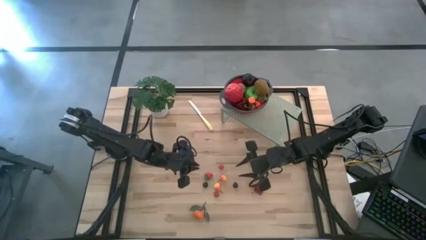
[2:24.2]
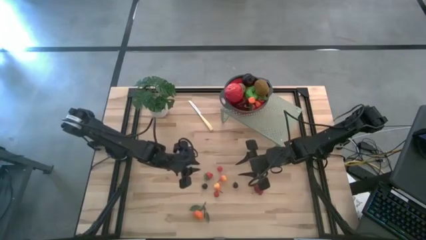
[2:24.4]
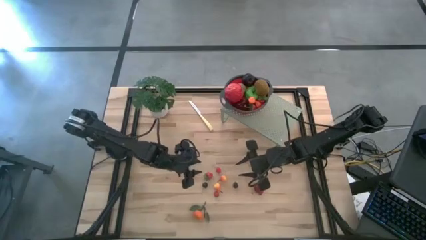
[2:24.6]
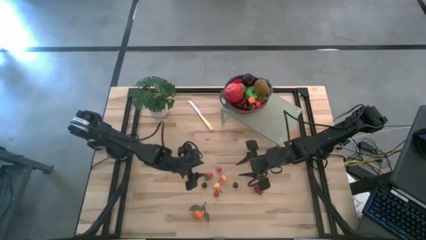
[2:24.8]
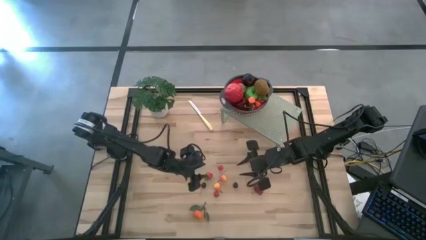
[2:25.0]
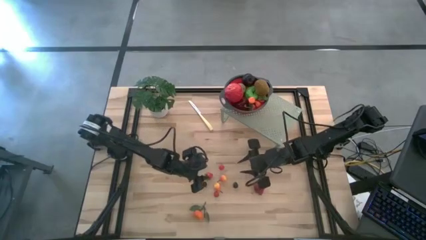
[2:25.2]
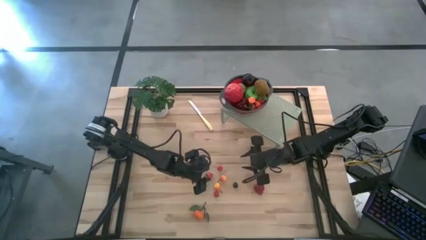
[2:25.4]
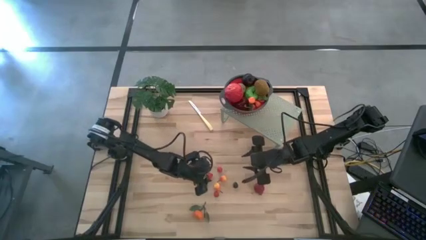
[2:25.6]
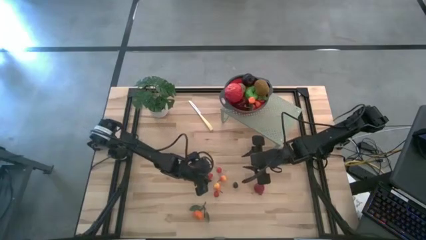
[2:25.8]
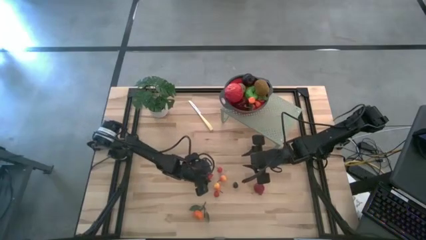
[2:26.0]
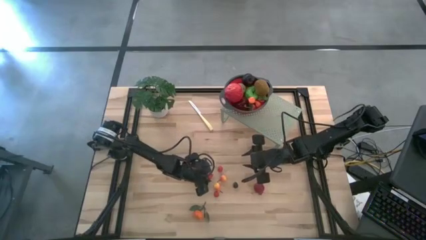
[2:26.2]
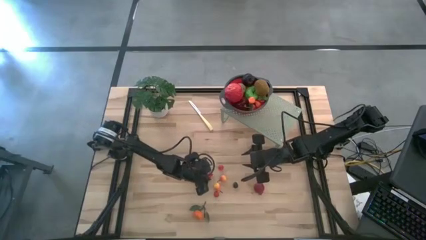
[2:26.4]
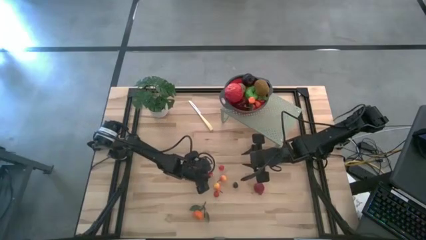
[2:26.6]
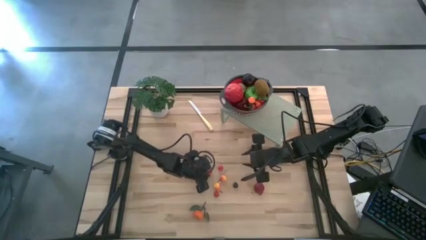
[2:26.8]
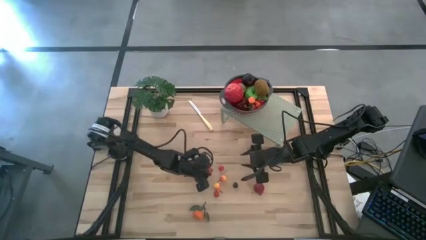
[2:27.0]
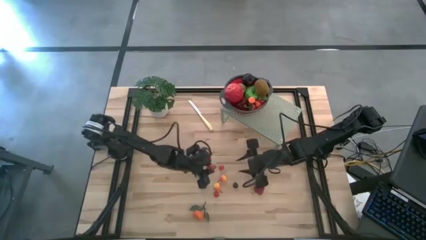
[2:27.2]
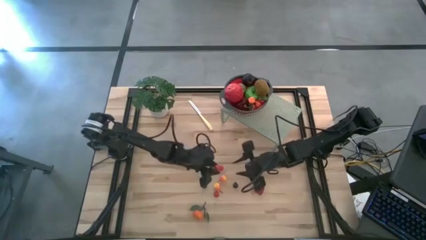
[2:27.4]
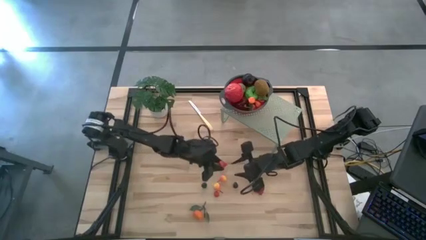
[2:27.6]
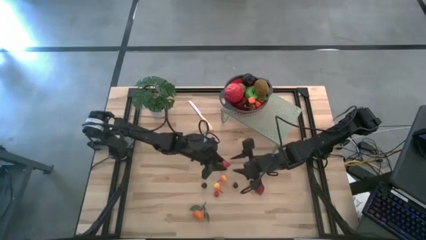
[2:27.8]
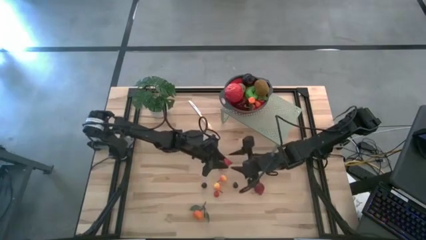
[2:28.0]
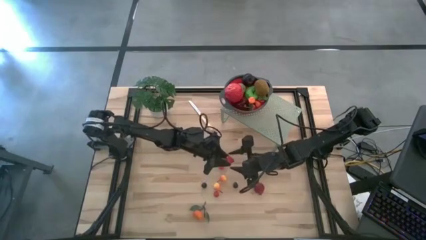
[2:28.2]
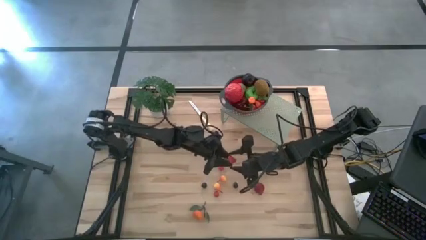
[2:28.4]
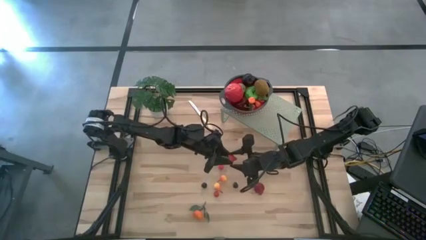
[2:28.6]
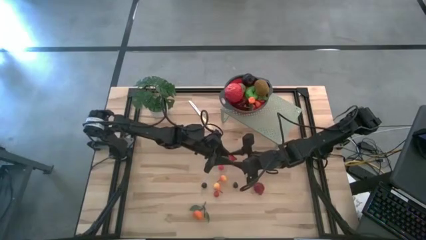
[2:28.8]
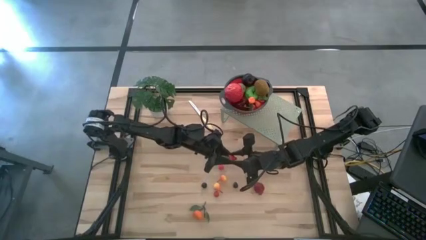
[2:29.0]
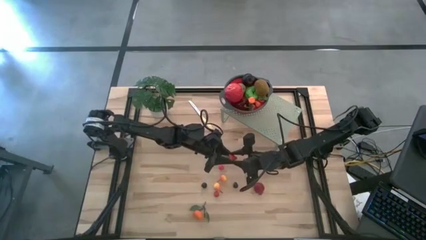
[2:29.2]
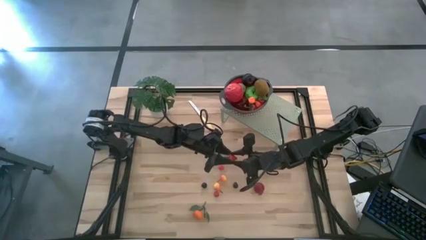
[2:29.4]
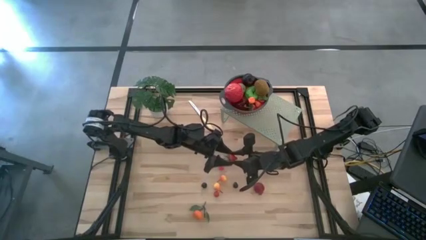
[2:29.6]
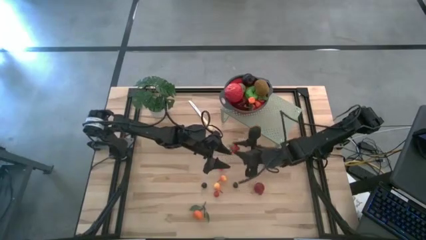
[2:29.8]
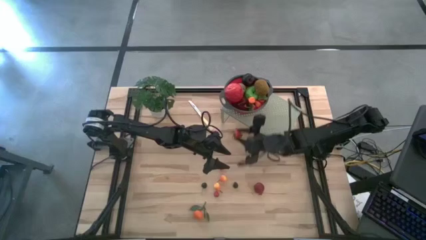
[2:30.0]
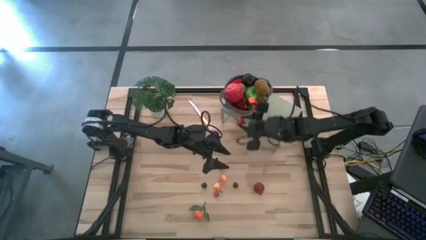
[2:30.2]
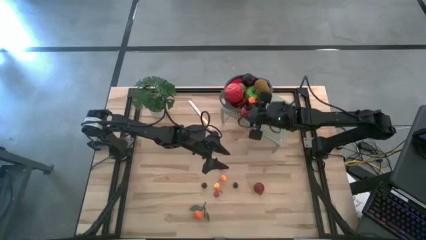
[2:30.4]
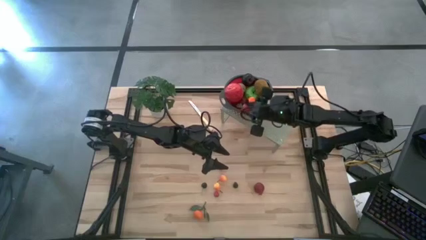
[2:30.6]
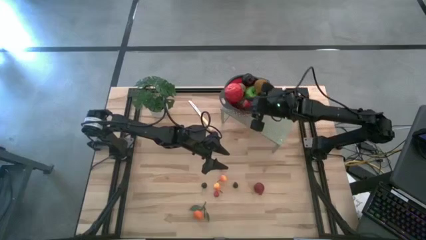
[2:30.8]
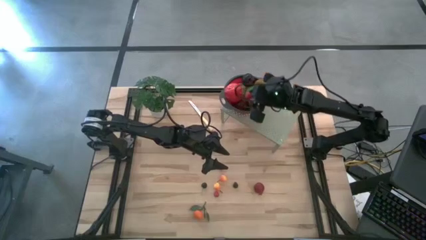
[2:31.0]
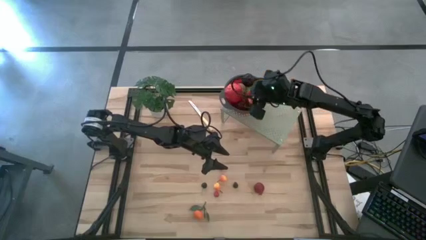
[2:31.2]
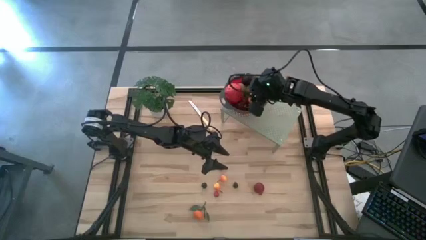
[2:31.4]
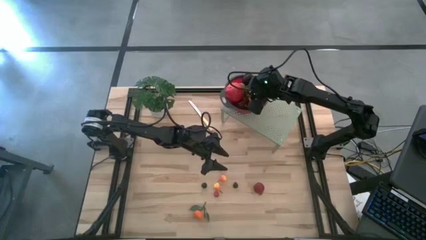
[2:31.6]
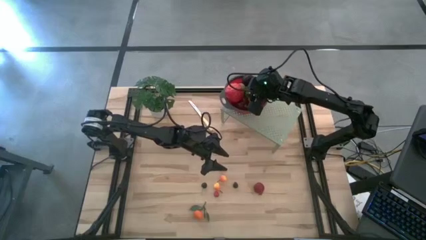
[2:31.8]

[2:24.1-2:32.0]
Task: Pick & Place Fruit
Put the strawberry into the red gray colander on the shelf

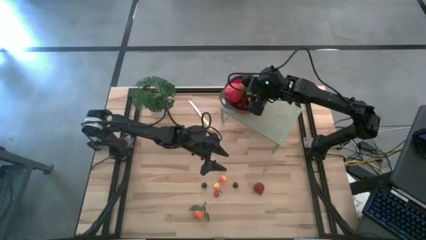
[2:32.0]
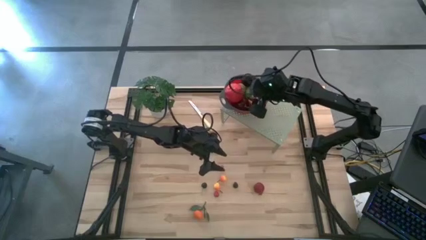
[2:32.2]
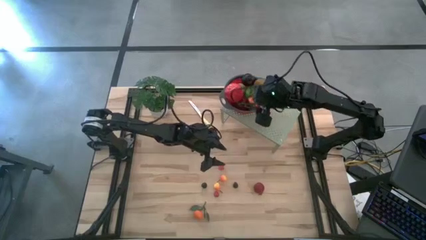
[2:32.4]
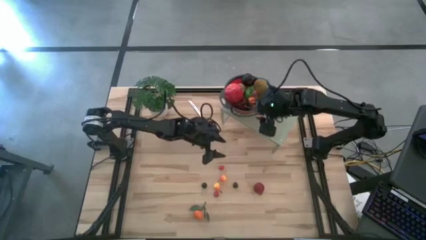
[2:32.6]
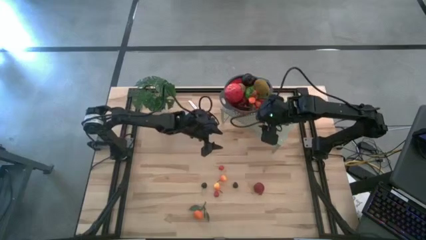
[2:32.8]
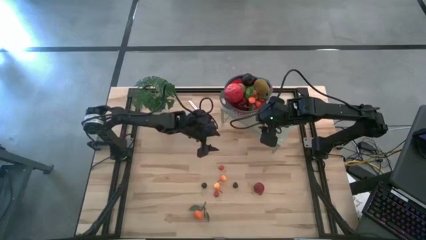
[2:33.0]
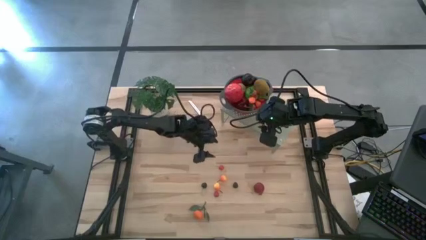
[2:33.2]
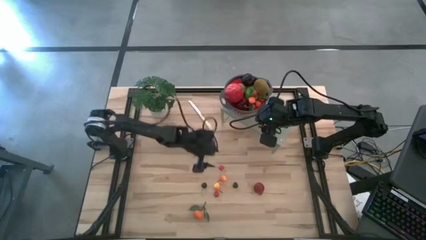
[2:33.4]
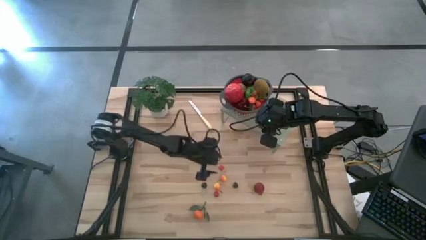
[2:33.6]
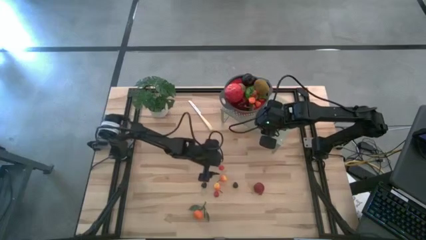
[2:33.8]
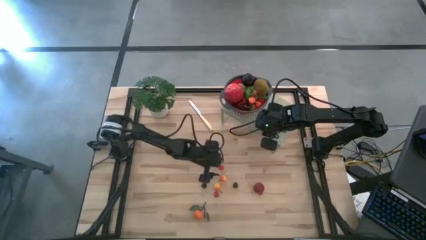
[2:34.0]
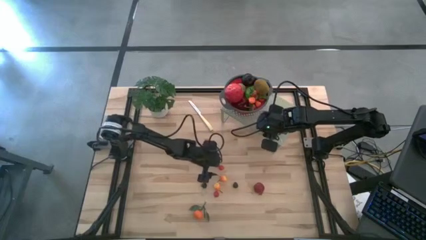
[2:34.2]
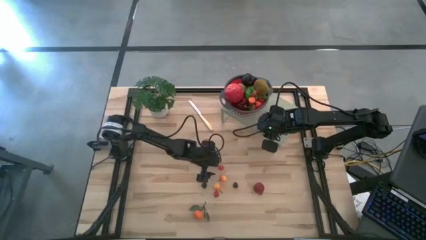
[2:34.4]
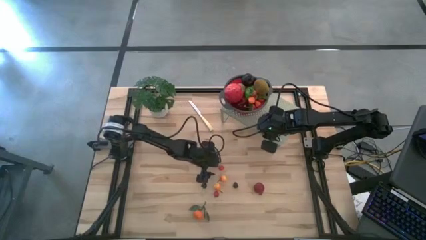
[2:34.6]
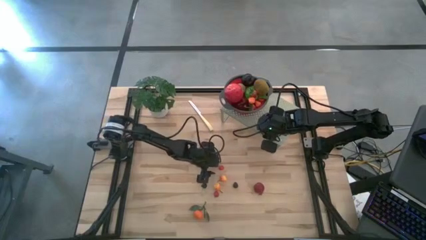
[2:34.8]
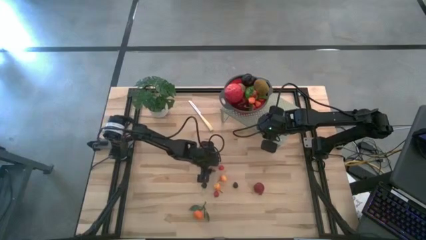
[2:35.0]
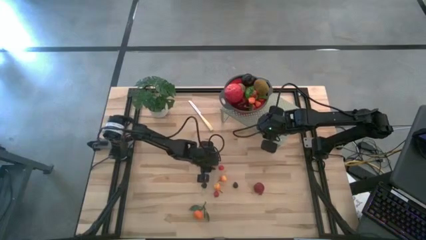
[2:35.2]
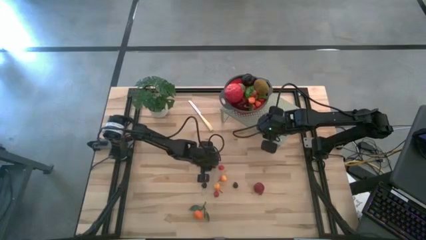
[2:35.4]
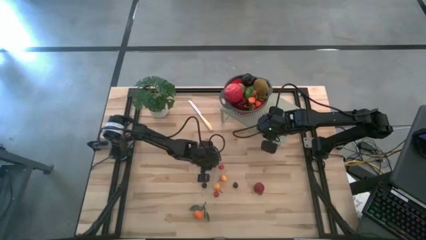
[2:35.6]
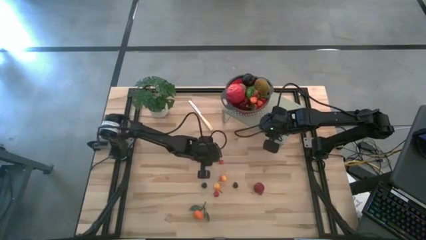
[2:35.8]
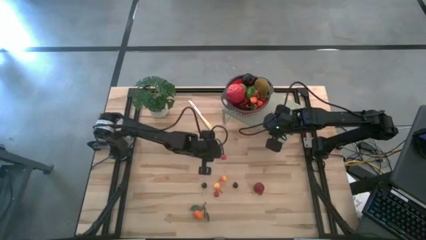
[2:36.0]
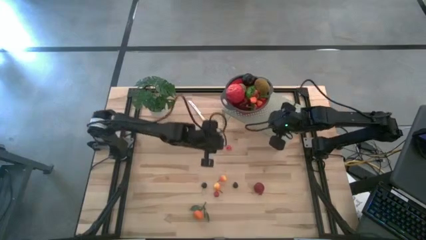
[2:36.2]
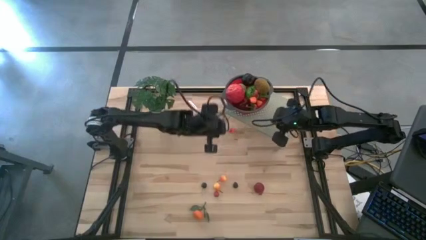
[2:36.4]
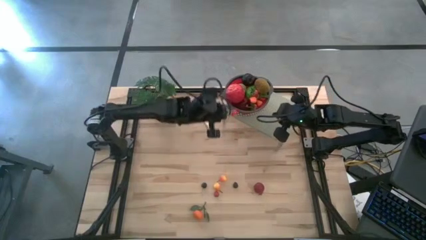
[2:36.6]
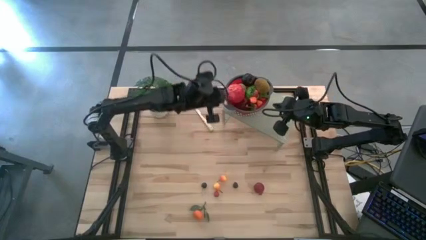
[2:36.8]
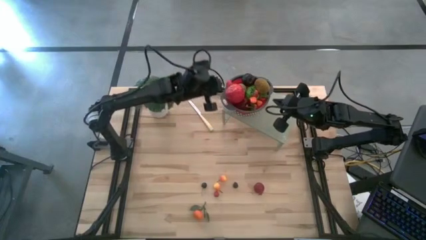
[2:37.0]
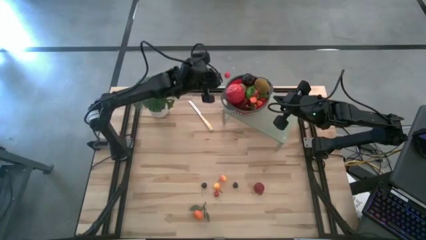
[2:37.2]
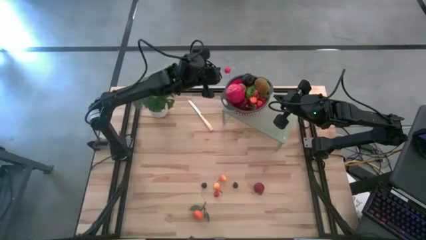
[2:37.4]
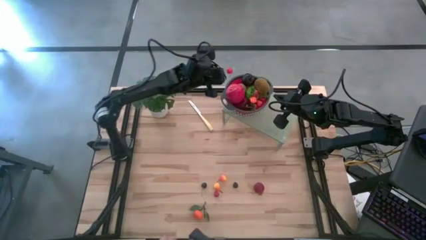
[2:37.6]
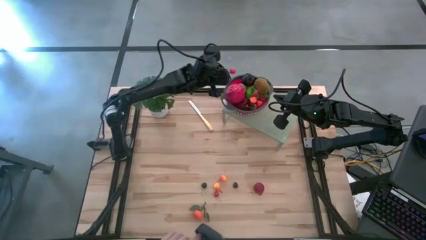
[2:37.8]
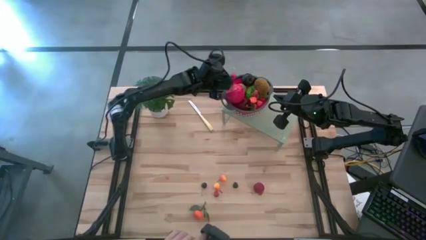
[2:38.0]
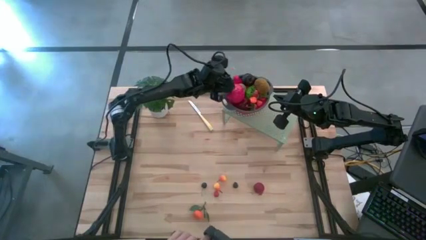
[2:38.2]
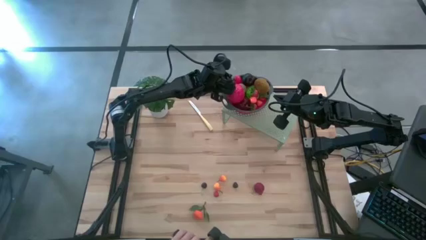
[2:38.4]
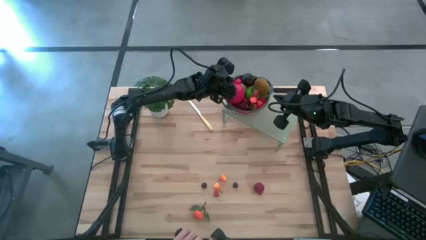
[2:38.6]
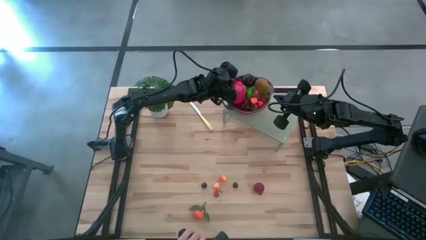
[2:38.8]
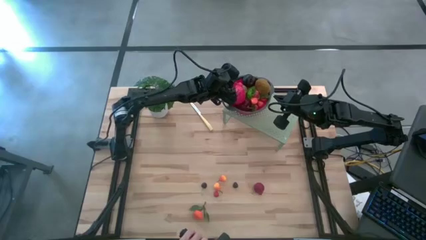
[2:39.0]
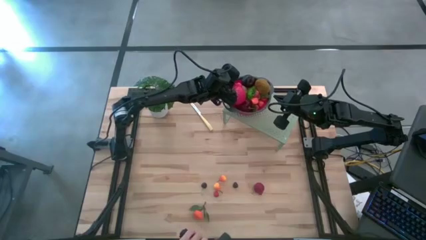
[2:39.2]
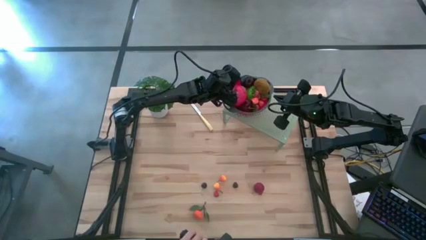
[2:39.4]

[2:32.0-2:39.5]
Put the red cherry into the red gray colander on the shelf
